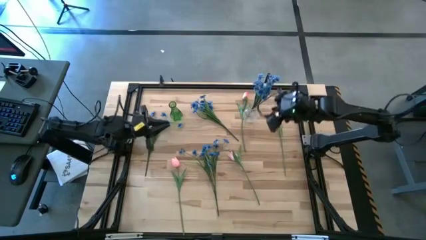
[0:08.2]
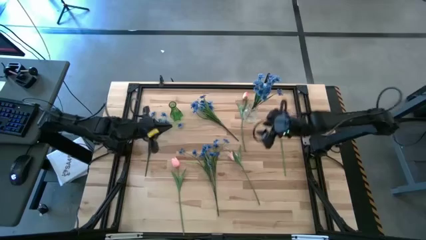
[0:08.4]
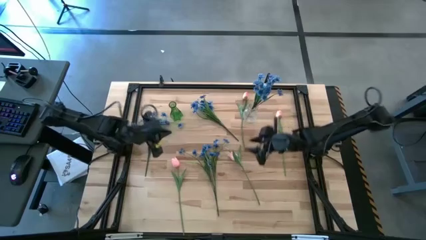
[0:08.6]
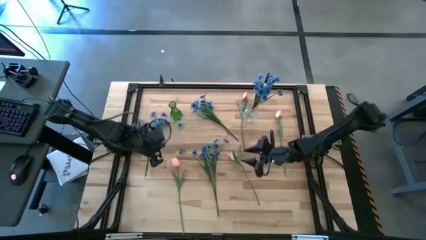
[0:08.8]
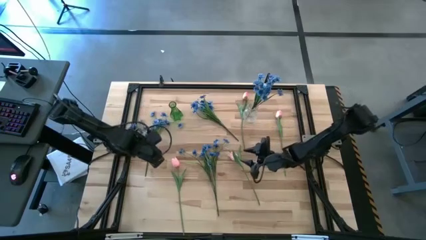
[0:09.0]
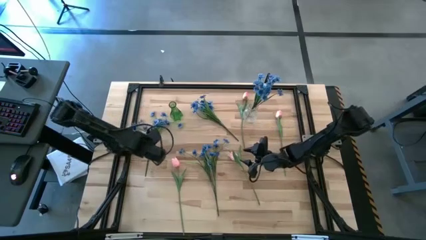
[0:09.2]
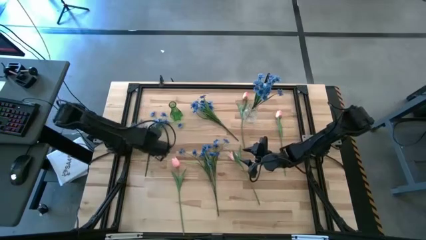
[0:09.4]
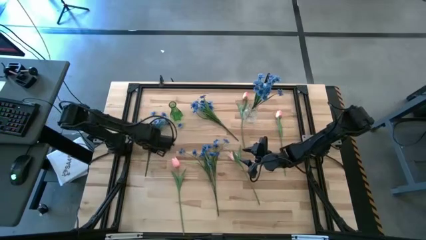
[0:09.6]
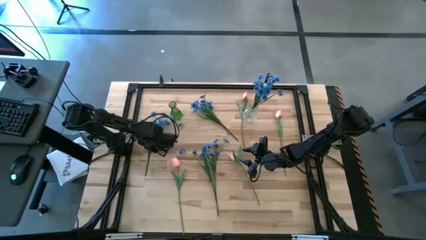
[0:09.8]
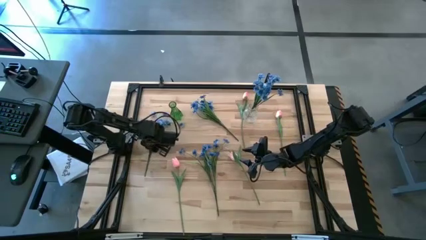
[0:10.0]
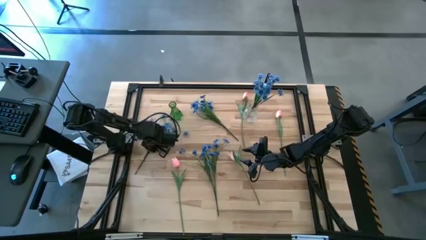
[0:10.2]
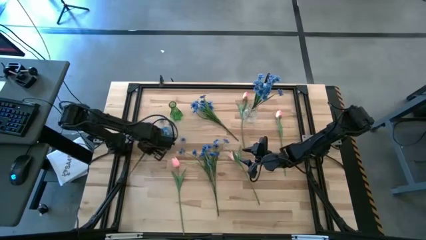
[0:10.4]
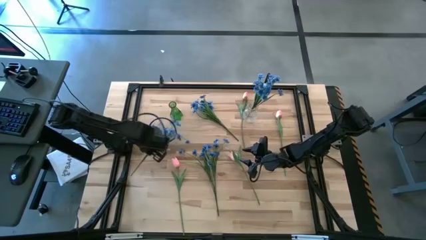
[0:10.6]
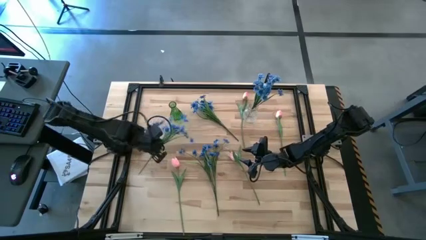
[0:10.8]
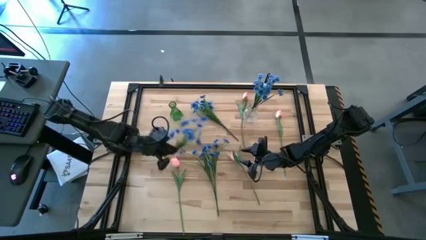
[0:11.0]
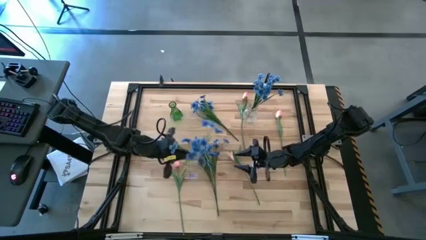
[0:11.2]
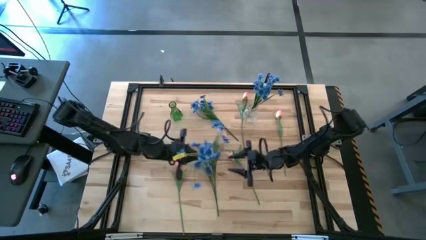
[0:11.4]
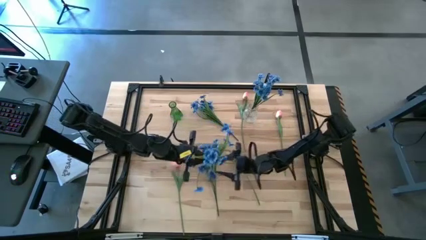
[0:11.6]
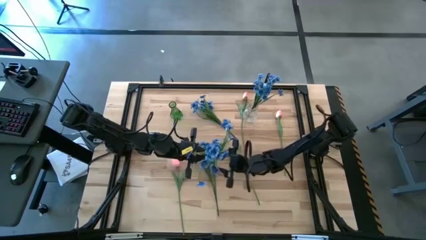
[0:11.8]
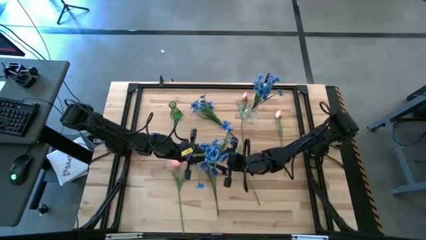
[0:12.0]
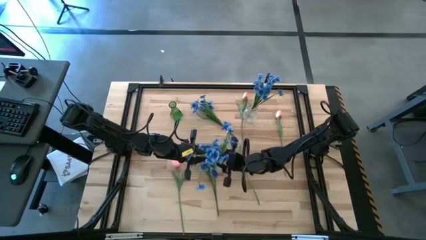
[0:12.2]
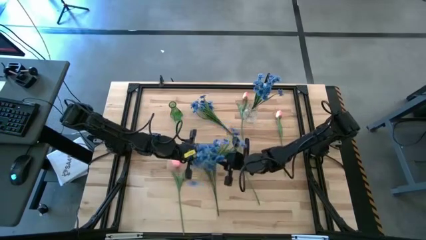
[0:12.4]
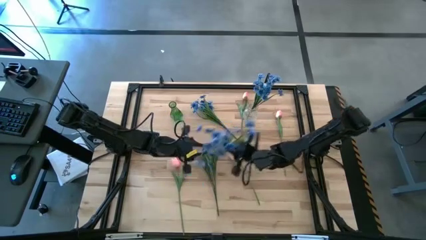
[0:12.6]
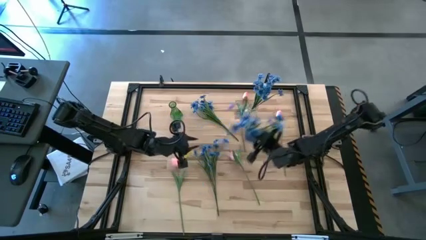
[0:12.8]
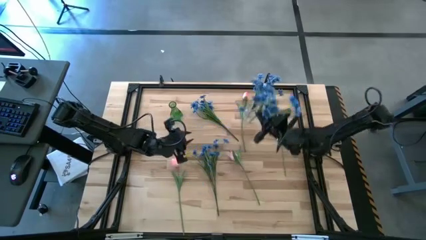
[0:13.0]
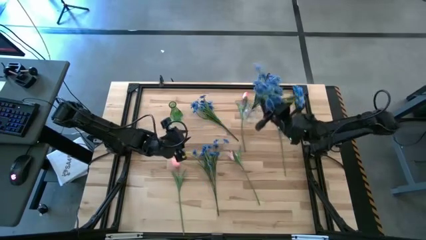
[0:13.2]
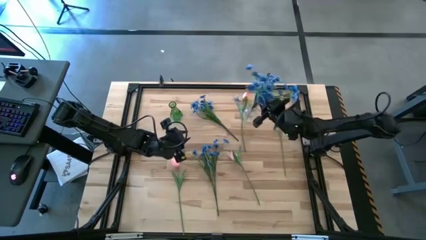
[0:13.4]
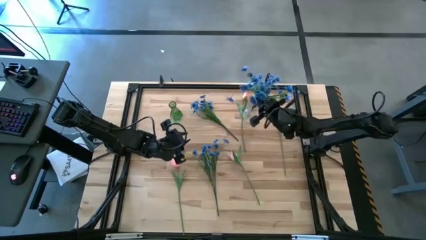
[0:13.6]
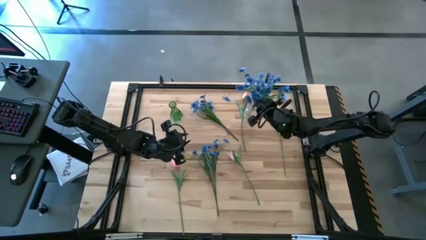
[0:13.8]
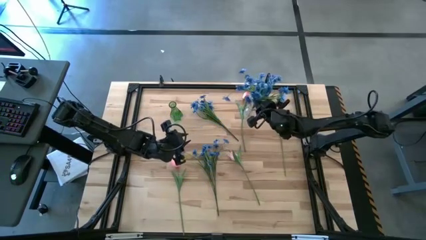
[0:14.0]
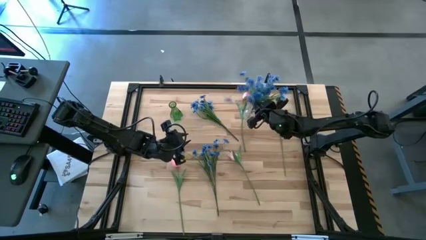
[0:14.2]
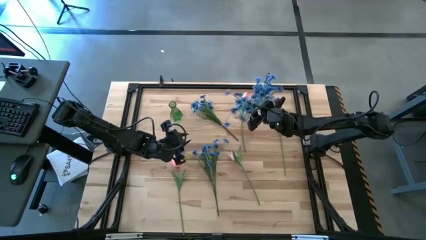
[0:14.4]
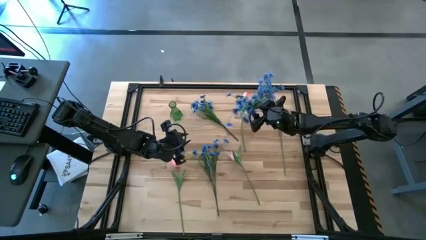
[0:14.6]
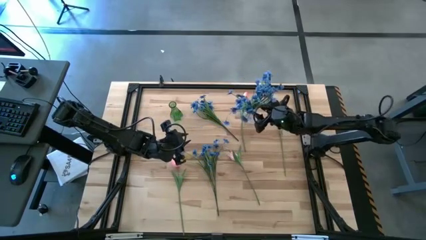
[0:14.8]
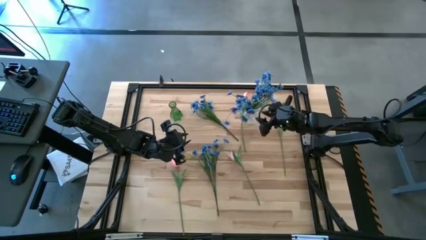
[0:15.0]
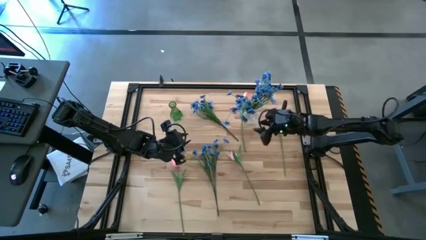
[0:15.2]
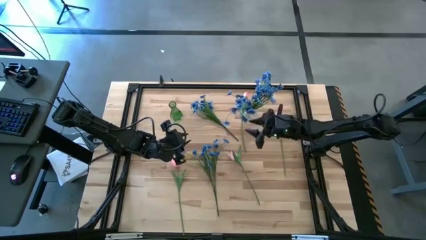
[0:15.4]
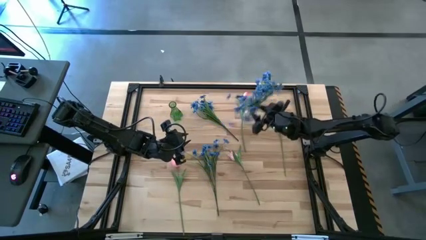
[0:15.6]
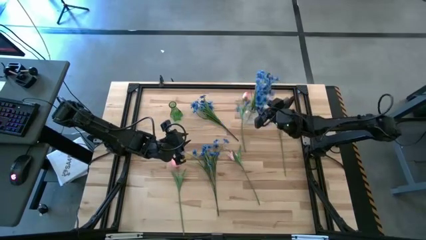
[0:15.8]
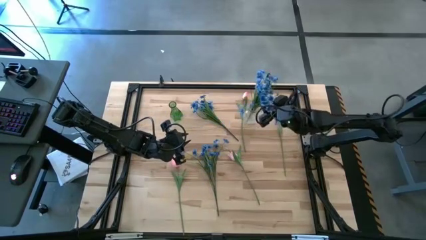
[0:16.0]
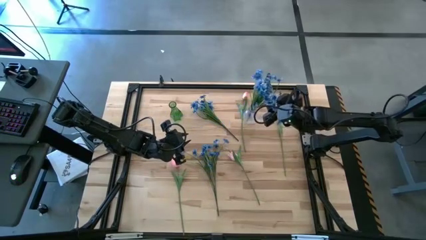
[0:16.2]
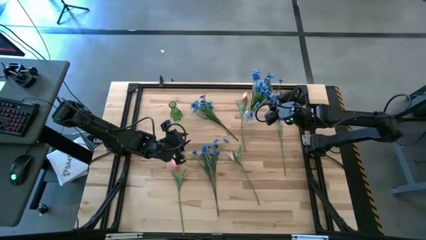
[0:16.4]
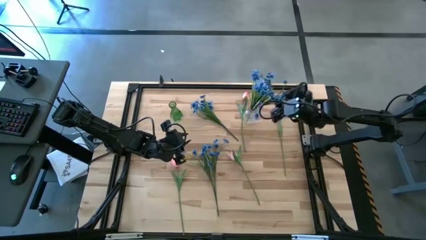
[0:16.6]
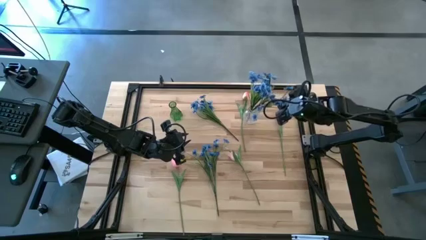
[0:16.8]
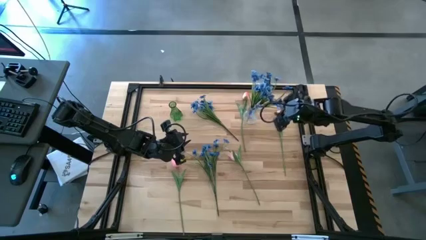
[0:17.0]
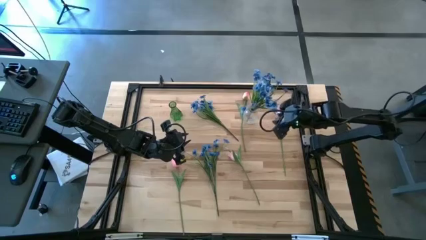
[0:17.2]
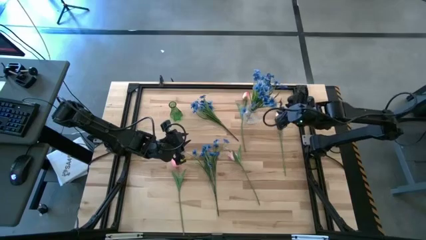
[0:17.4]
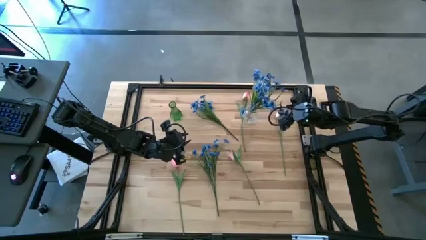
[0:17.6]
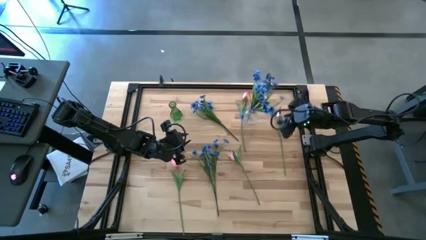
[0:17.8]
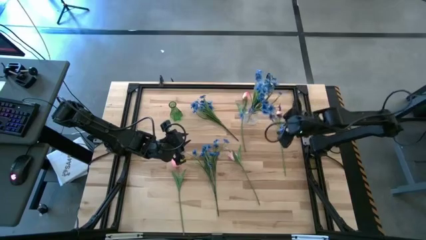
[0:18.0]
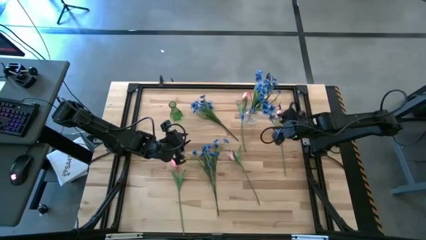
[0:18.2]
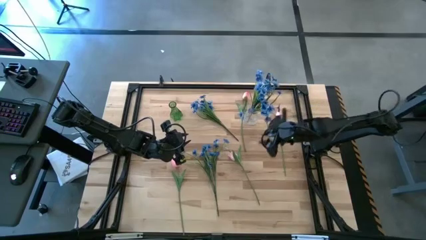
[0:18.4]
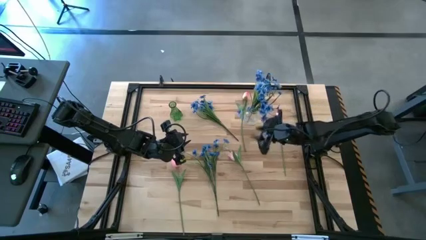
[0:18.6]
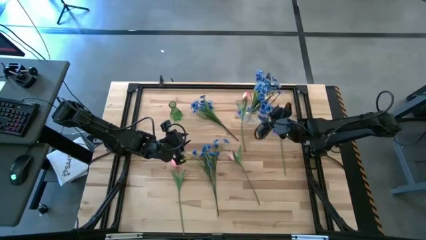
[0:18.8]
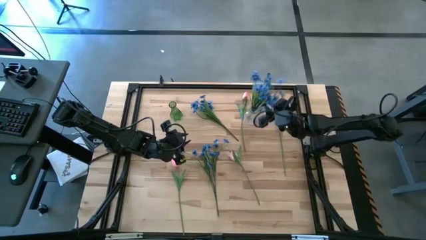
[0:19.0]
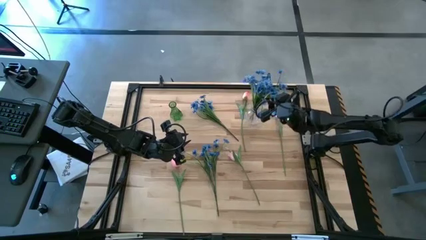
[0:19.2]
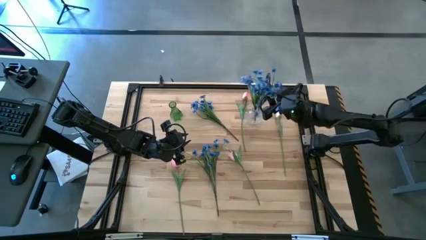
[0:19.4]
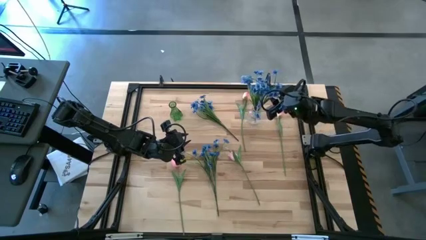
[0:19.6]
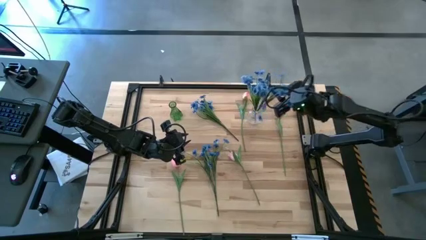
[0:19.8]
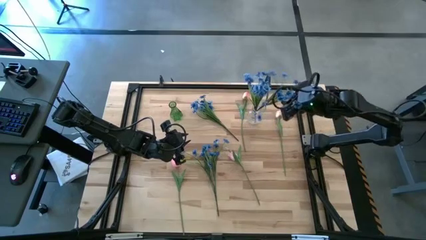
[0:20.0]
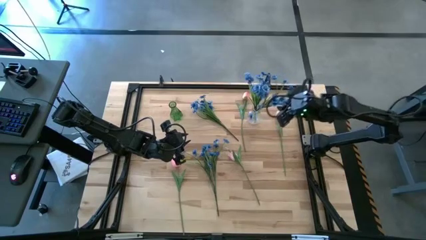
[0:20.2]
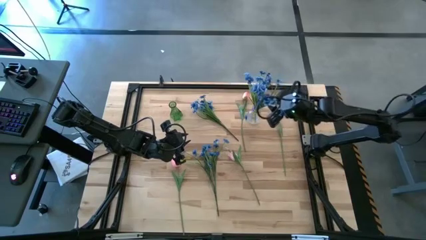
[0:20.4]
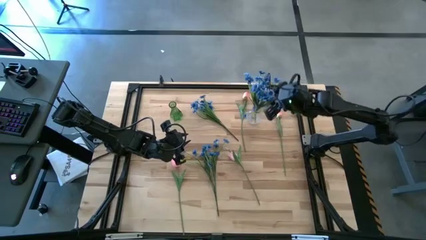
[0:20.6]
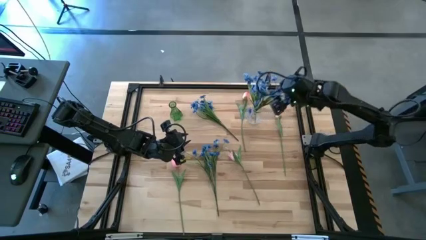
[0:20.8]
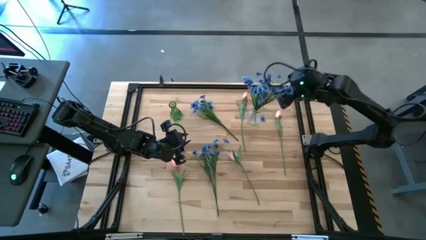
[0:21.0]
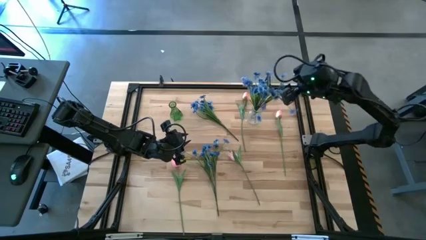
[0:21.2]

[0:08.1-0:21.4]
Task: Sort flowers into vase by color
Put the middle left blue flowers into the transparent vase

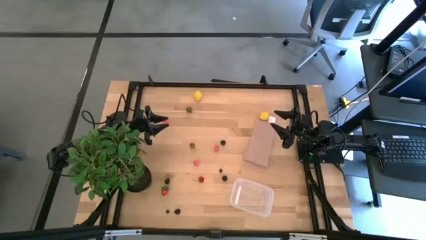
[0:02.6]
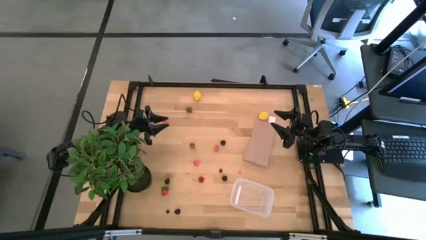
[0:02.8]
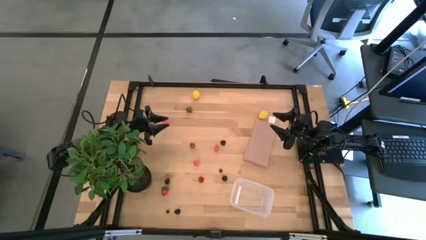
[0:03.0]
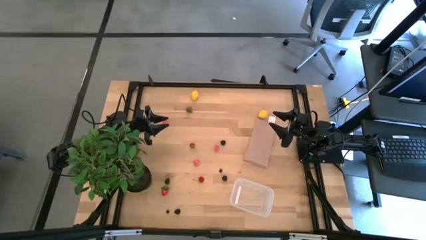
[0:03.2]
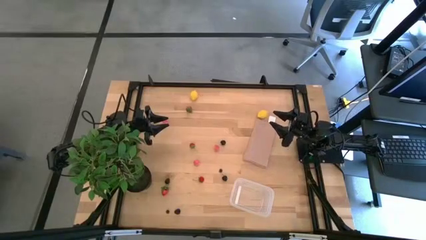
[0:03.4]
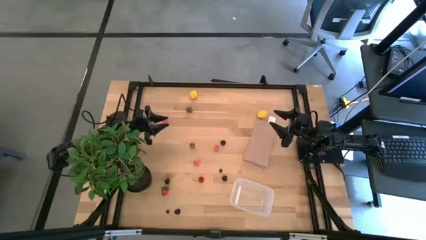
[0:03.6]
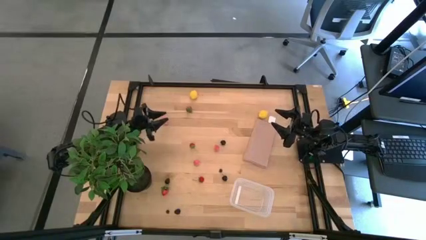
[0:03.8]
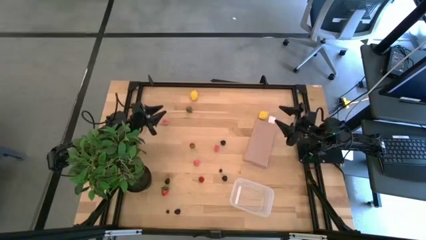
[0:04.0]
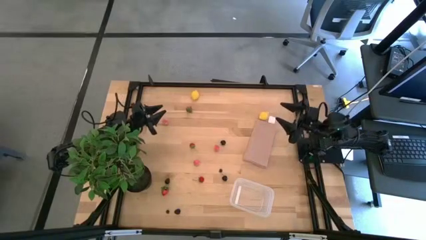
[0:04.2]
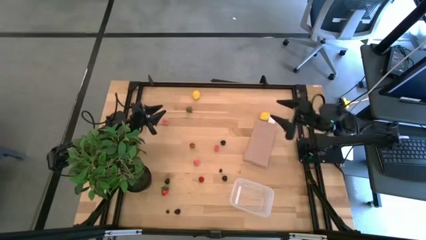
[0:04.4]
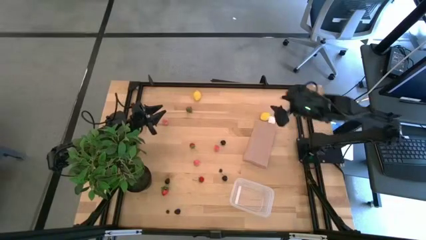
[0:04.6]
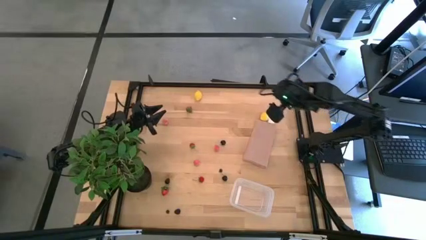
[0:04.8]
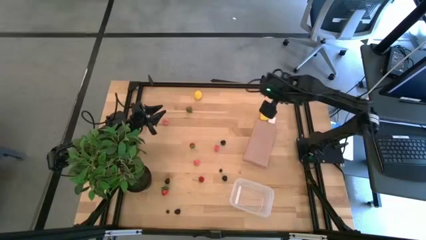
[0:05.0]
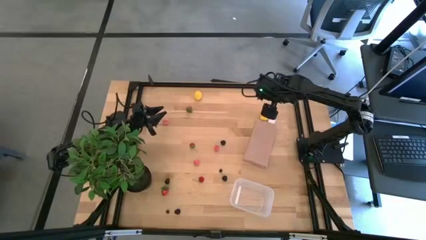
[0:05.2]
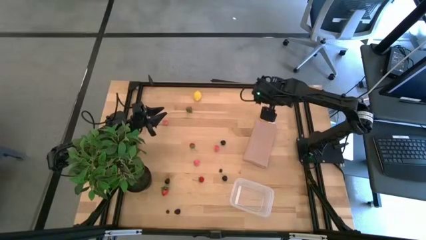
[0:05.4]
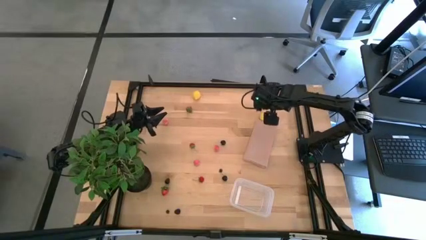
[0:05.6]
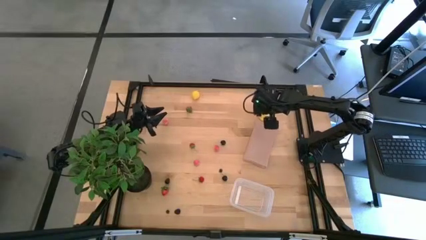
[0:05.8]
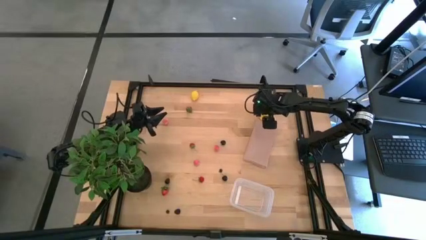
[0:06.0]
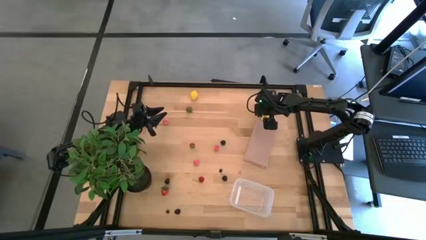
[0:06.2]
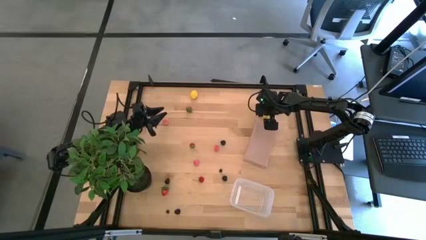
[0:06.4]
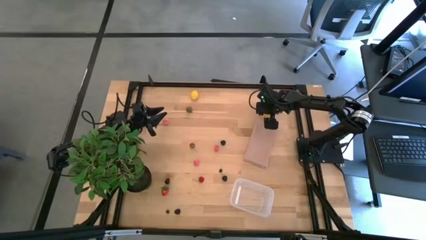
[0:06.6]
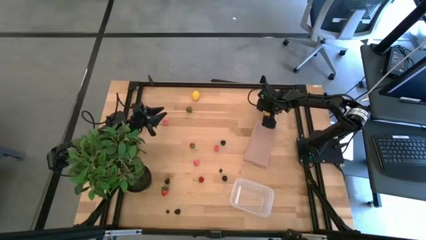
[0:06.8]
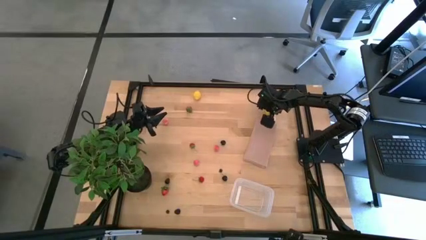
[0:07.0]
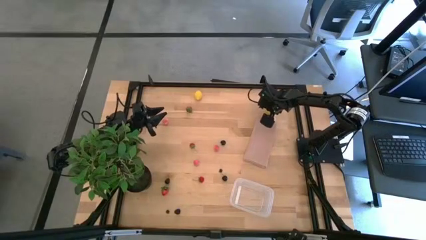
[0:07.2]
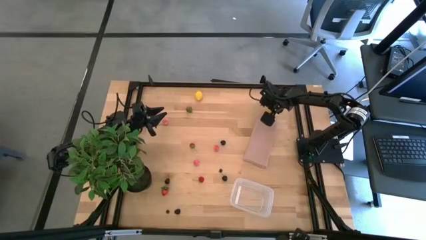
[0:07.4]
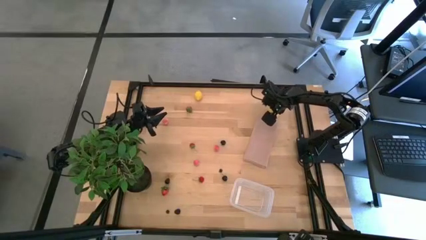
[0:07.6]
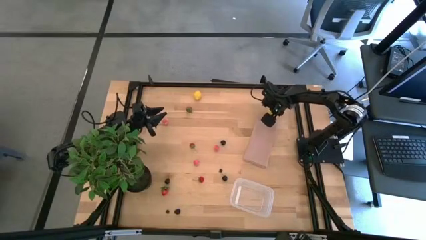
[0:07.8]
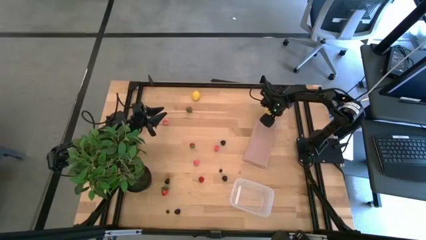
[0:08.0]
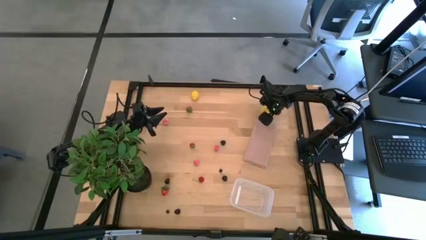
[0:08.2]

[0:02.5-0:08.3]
Task: Pick and placing Produce into tupperware
Put the lemon into the transparent container
